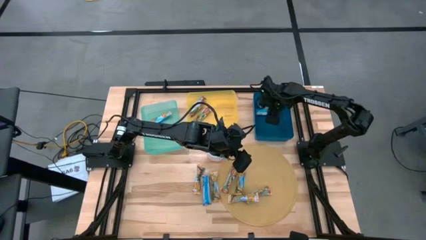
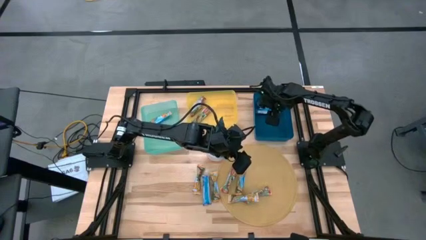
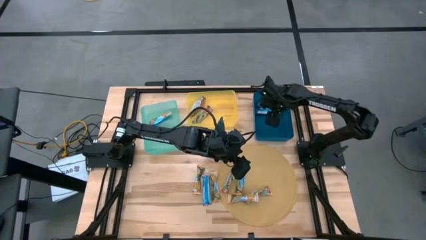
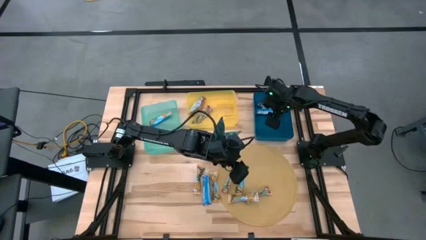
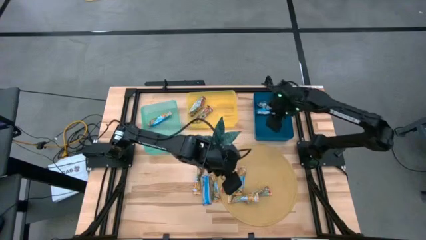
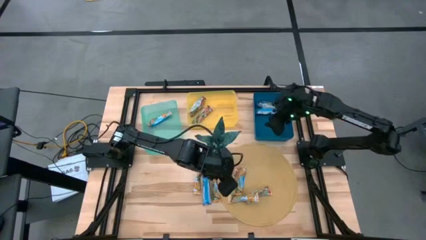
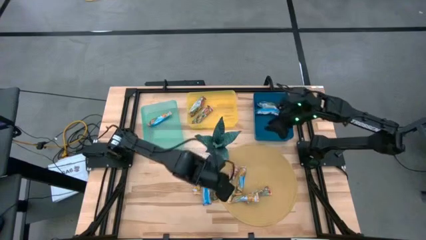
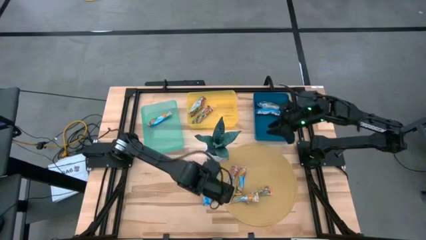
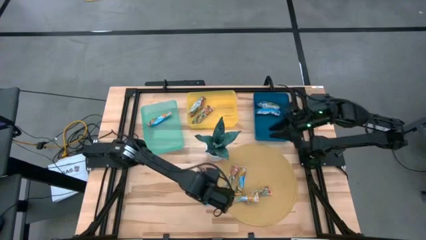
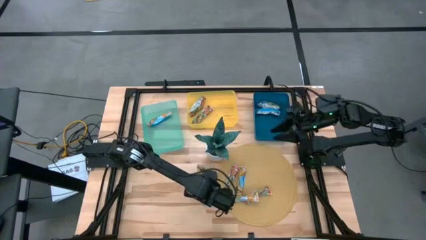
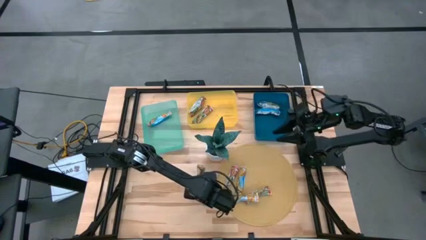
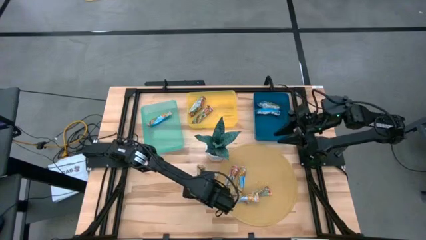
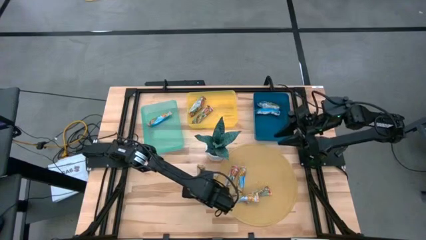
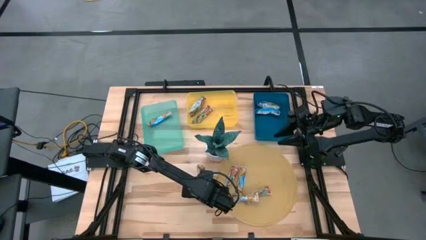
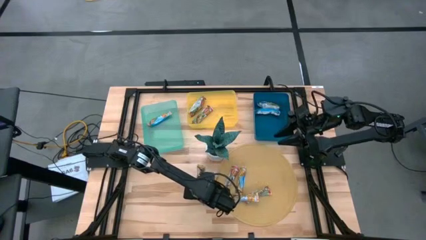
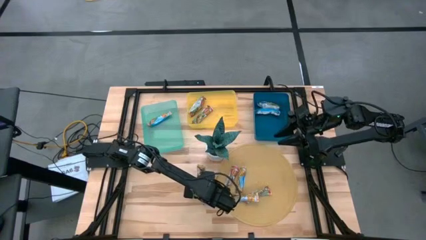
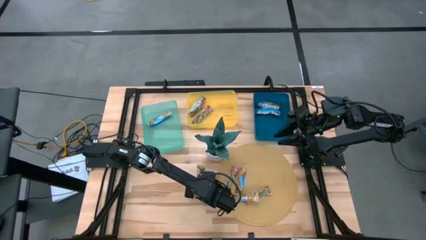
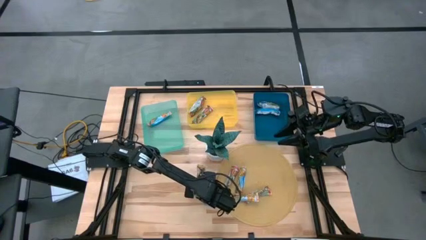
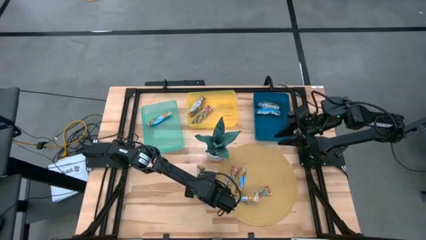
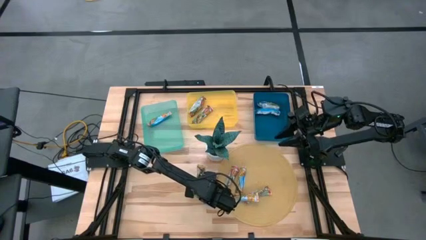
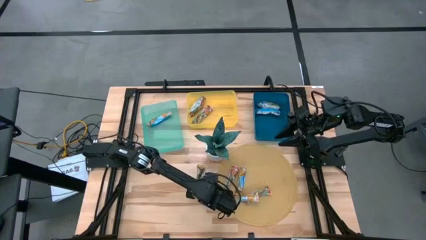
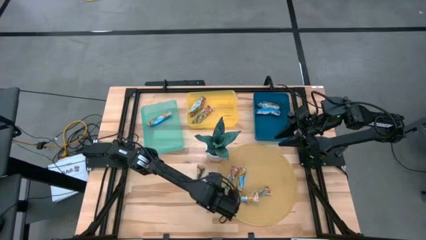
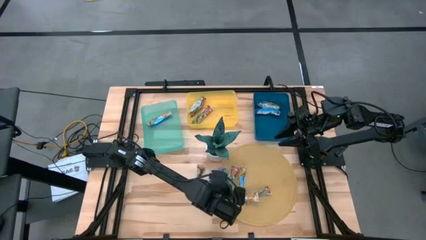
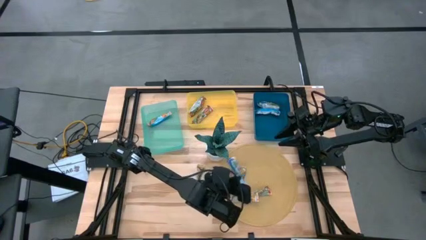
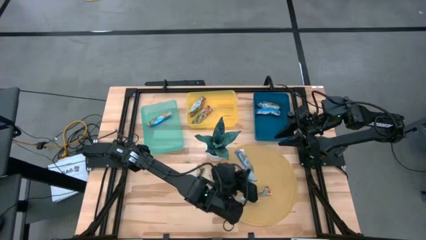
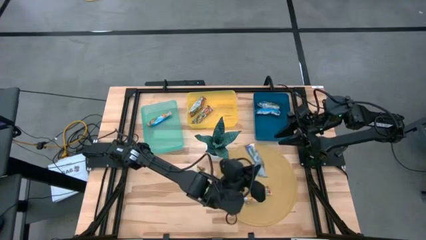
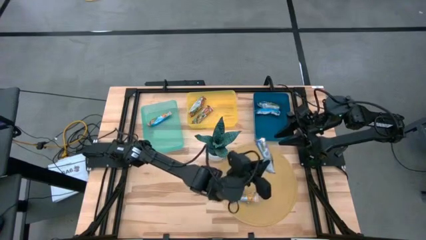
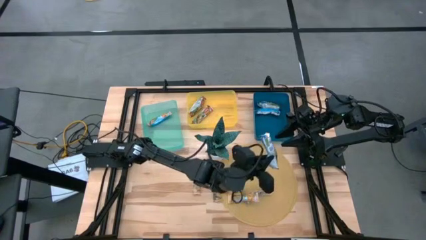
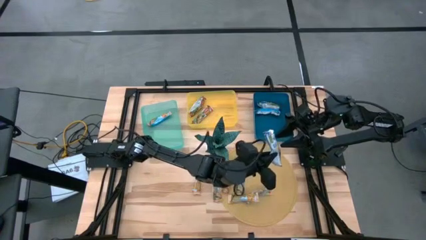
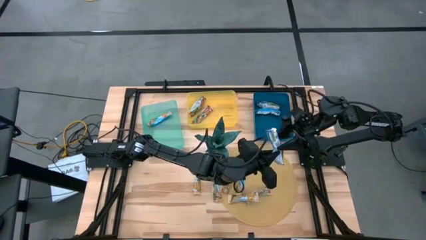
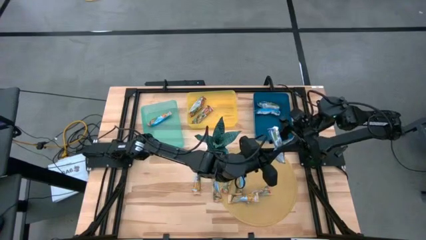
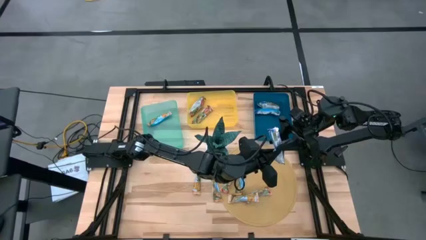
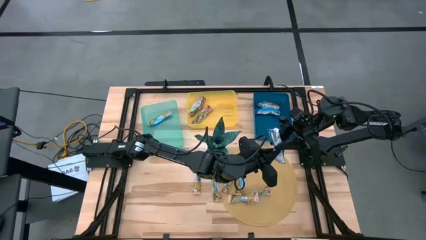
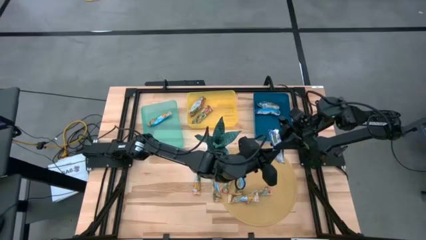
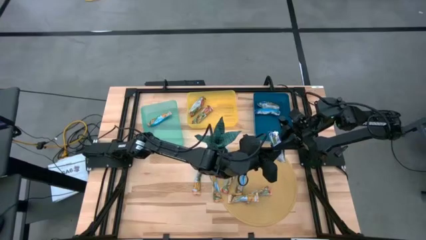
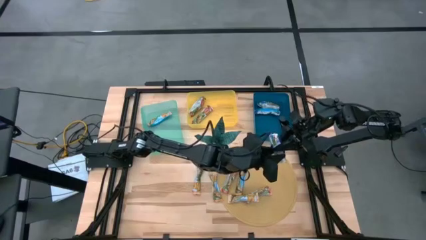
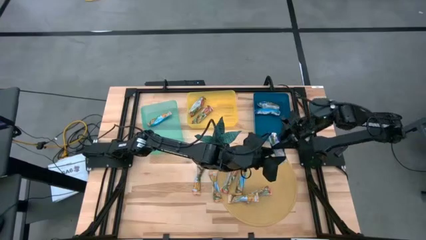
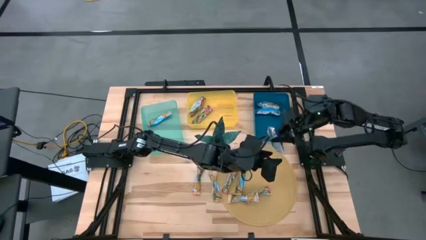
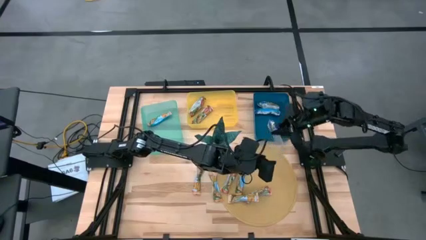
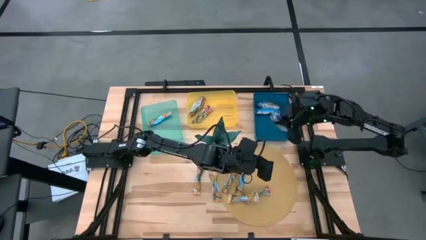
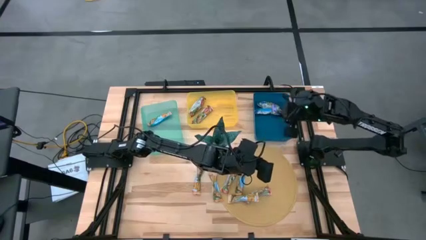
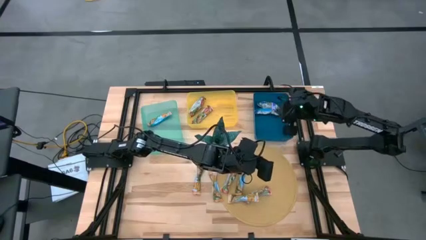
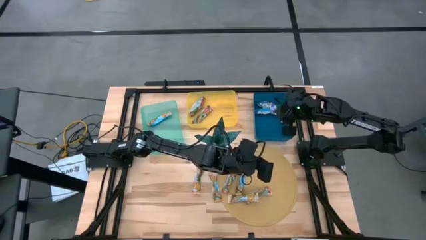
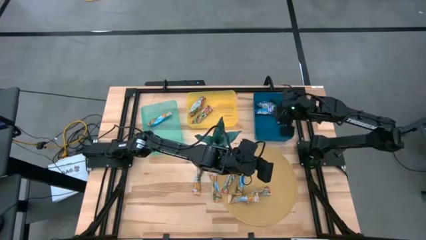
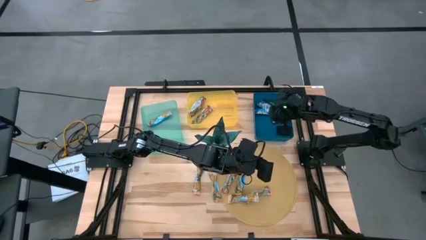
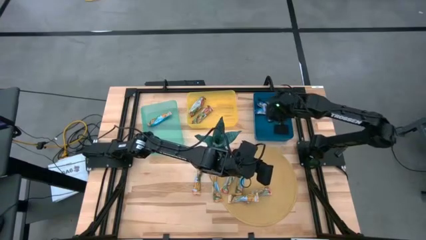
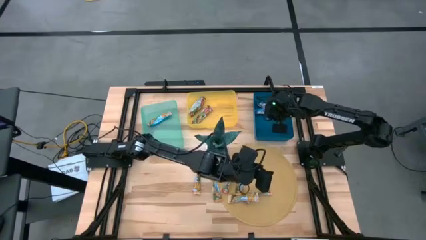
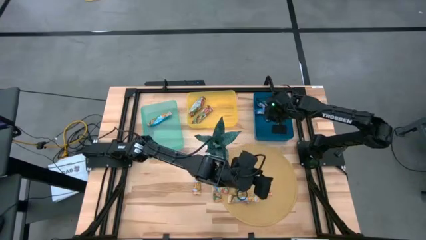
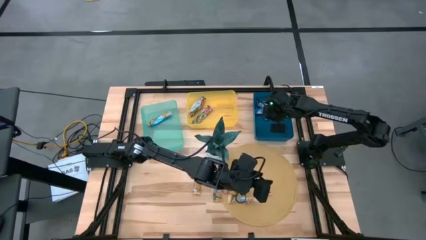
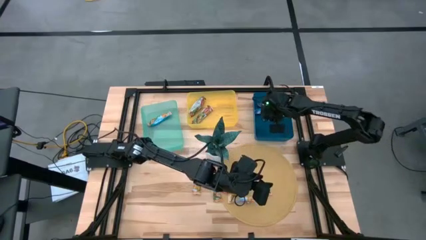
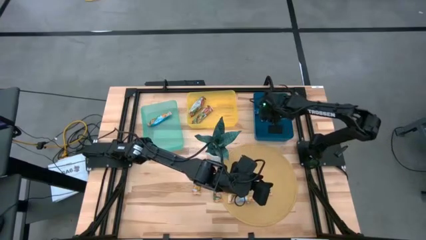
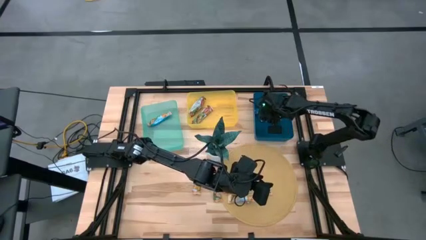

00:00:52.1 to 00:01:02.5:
Task: Pick and place Granola Bars by type
Put the purple granola bar into the blue bin
